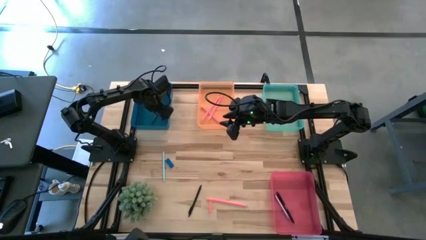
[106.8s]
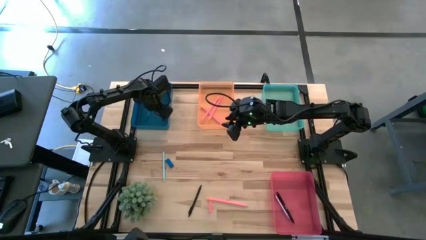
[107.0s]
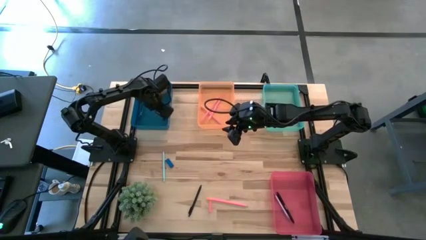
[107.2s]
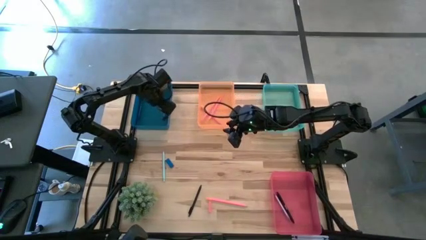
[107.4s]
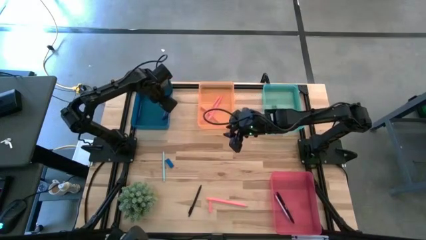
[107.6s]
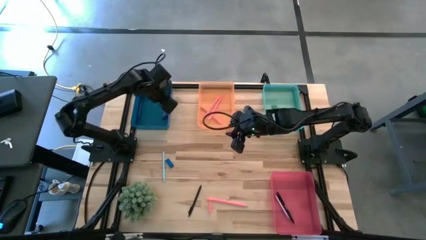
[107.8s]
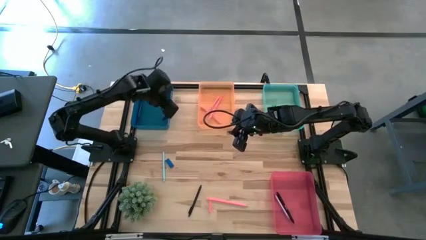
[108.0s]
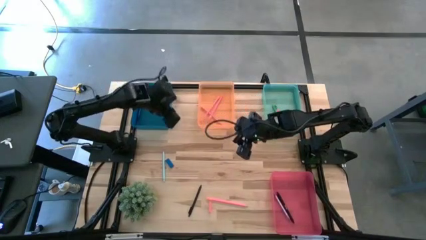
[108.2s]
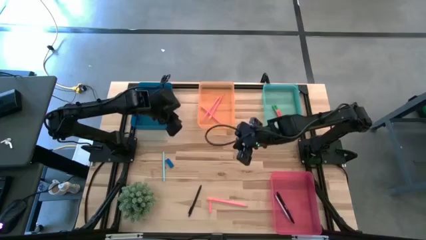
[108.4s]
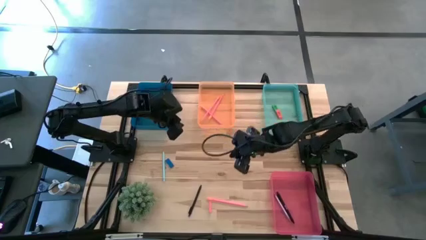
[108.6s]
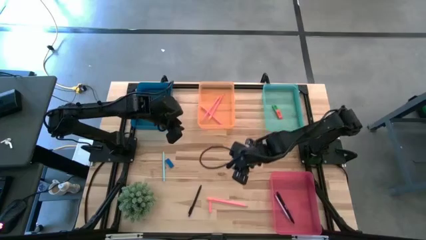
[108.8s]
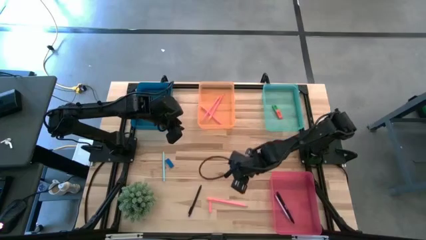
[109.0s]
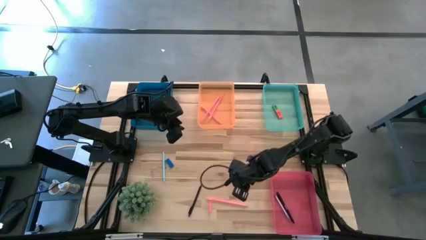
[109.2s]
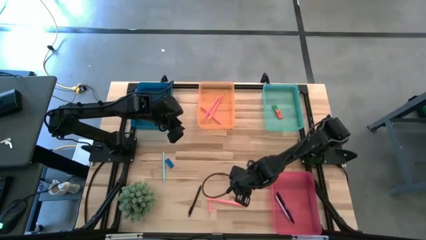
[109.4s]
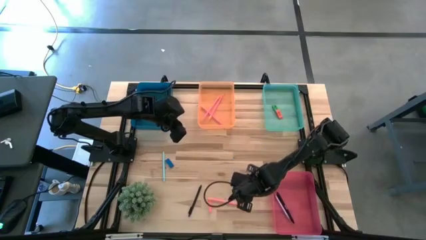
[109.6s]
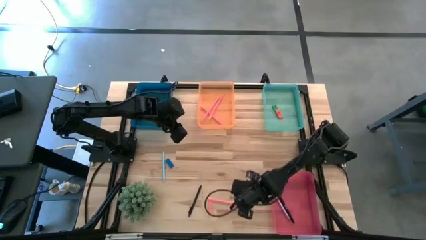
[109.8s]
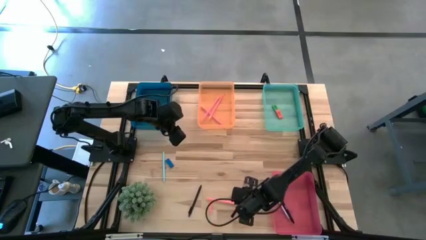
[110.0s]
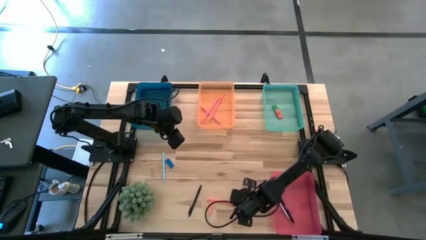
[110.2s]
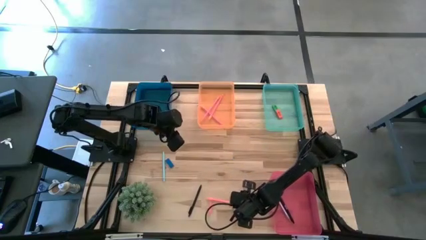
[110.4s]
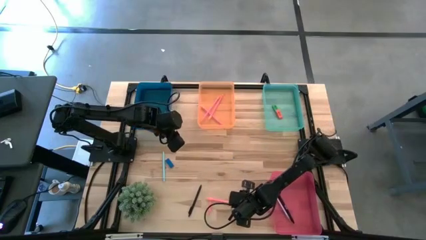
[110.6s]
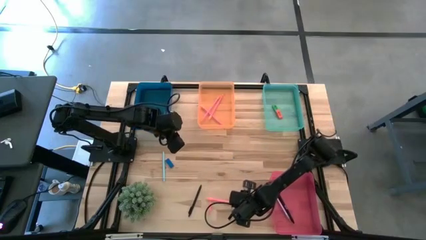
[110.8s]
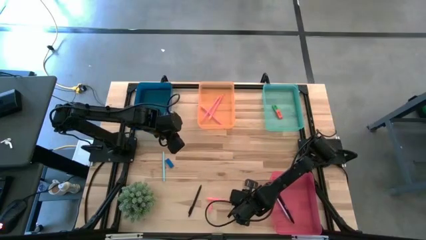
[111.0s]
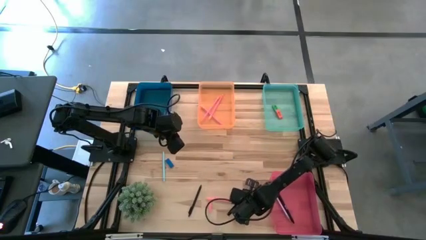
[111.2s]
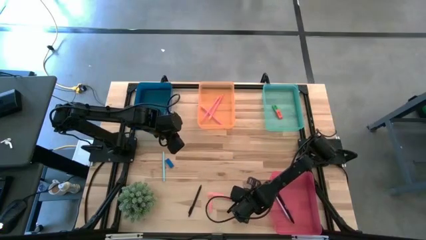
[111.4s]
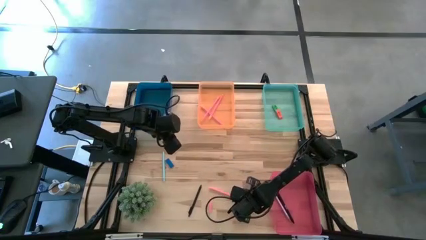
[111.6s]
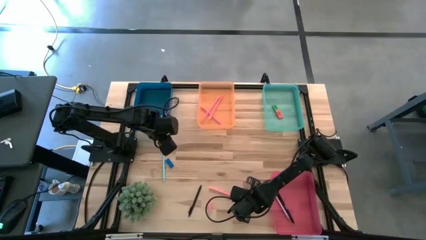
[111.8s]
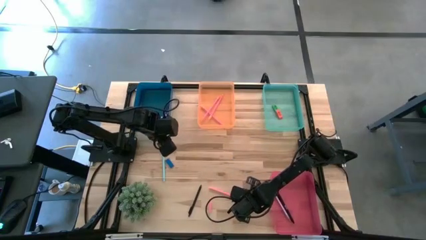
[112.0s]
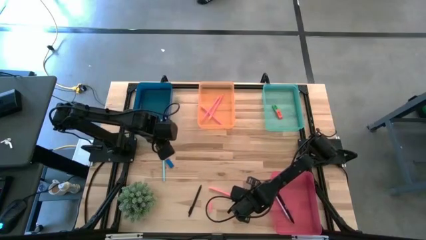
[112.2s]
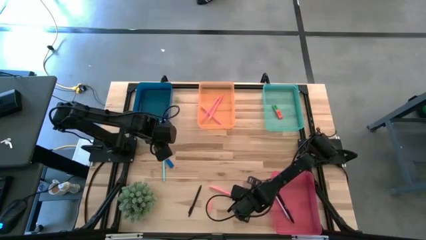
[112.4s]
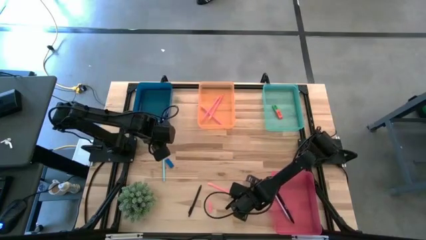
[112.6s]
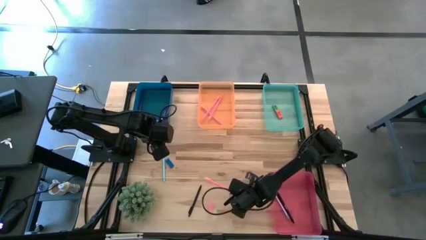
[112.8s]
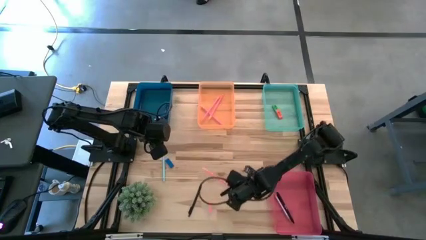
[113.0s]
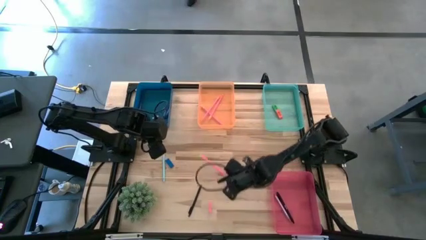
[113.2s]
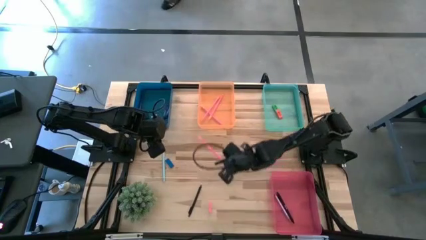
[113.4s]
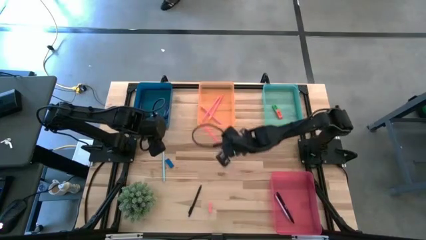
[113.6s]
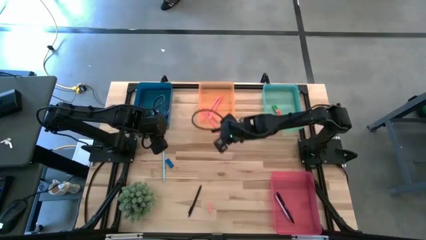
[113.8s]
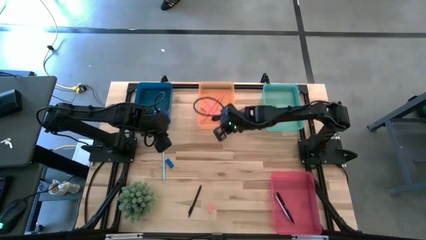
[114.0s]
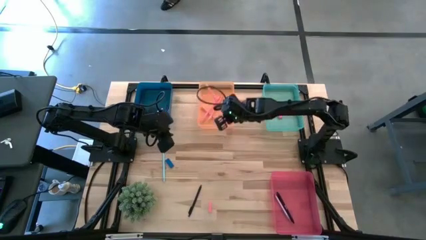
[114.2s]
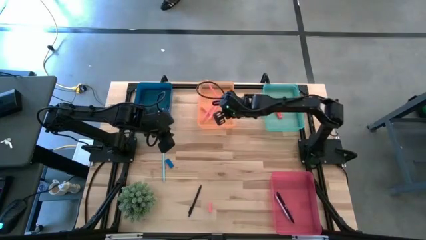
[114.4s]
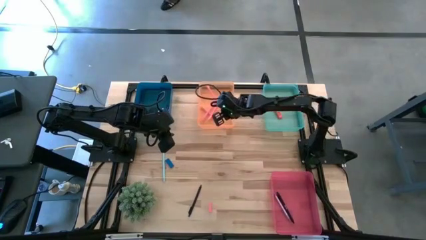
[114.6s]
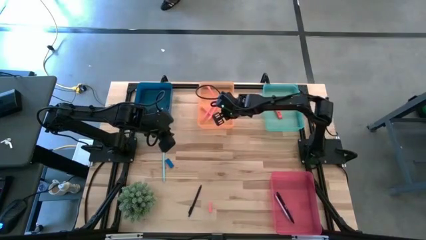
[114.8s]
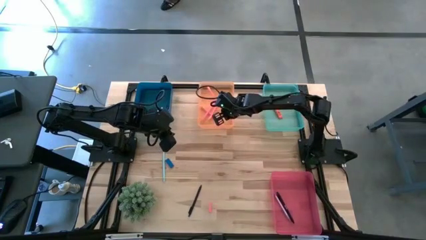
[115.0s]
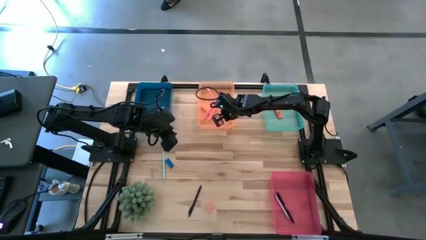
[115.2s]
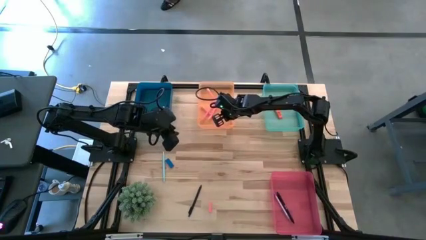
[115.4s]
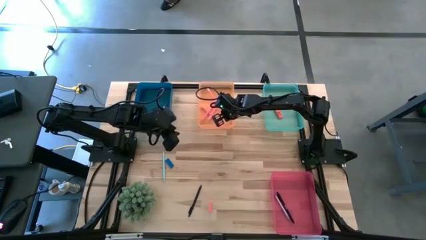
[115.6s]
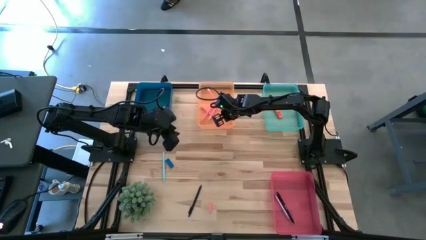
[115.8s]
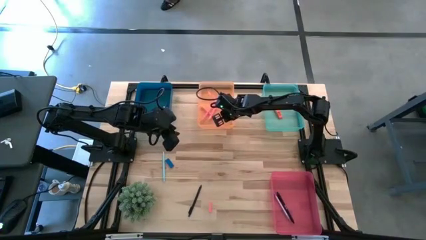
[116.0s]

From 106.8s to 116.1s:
Task: Sort crayons/erasers/pens/pencils in bins
Put the pink pencil into the orange bin

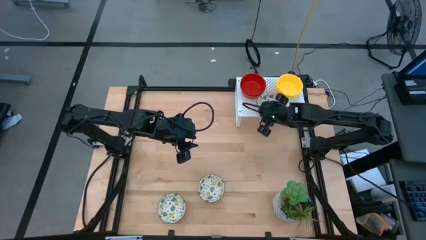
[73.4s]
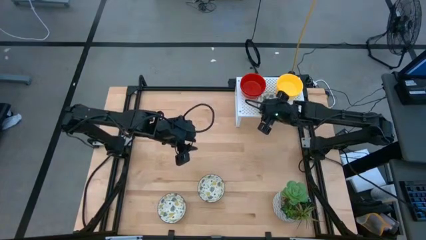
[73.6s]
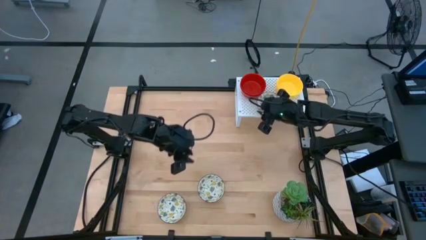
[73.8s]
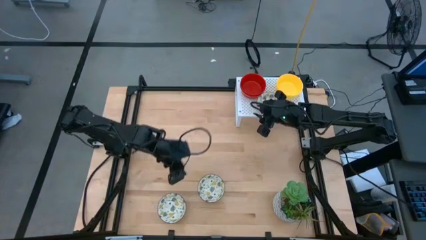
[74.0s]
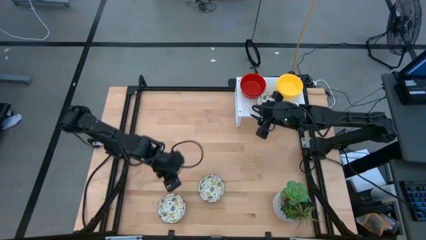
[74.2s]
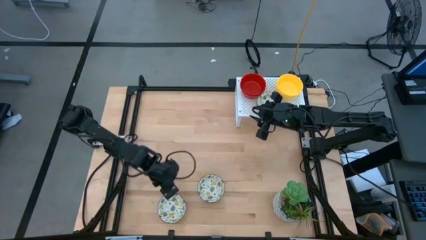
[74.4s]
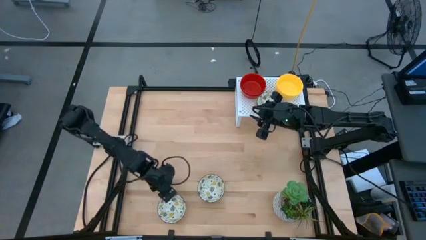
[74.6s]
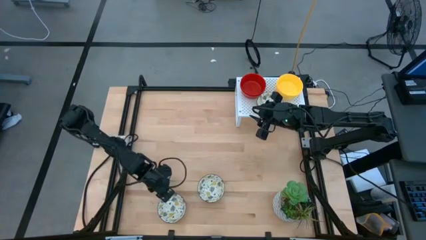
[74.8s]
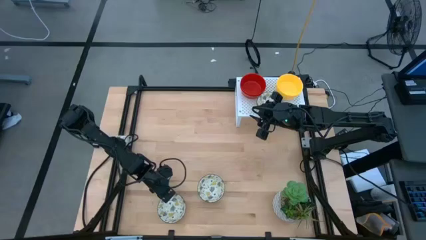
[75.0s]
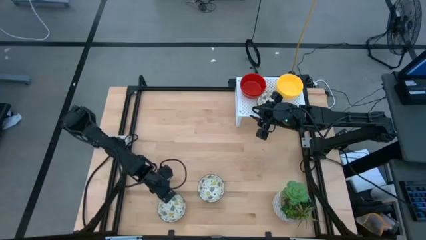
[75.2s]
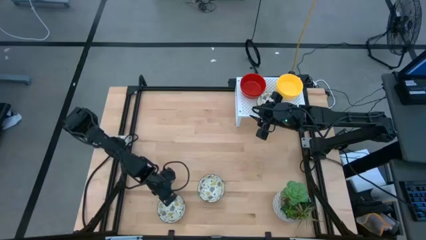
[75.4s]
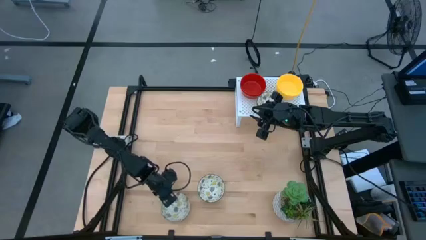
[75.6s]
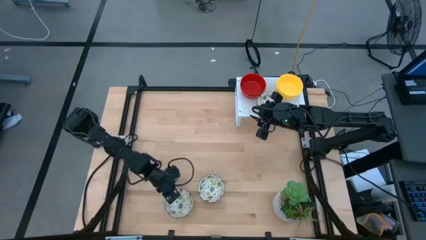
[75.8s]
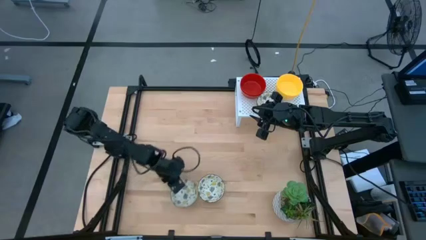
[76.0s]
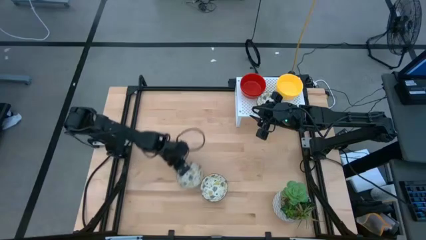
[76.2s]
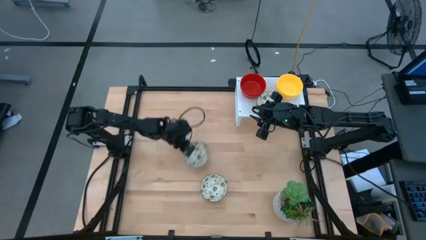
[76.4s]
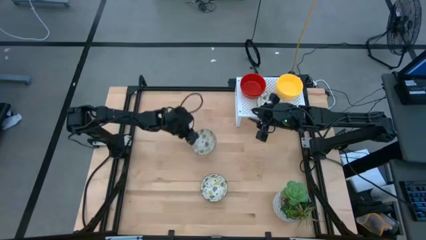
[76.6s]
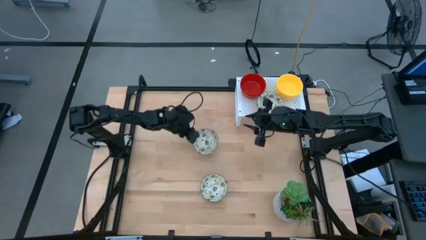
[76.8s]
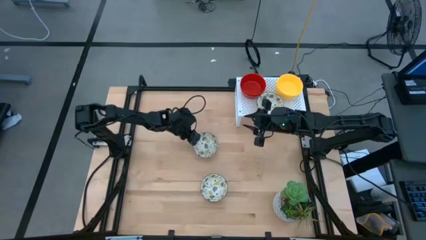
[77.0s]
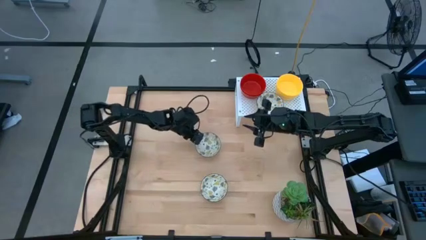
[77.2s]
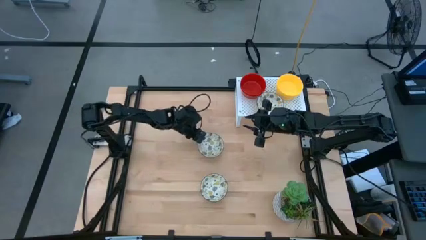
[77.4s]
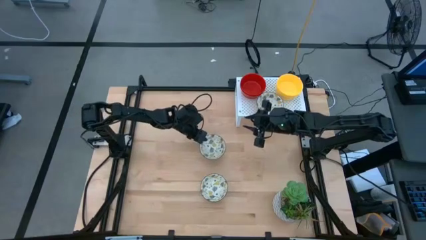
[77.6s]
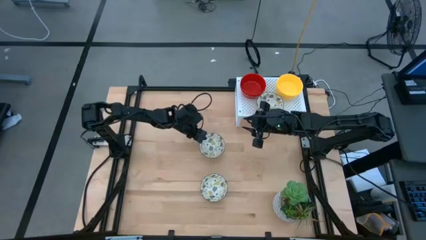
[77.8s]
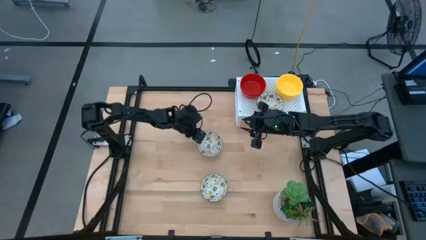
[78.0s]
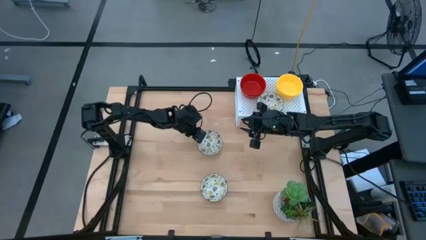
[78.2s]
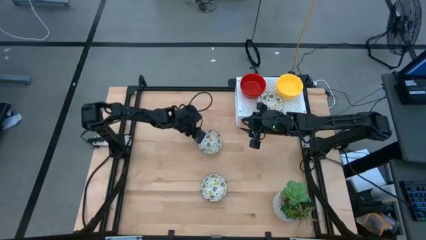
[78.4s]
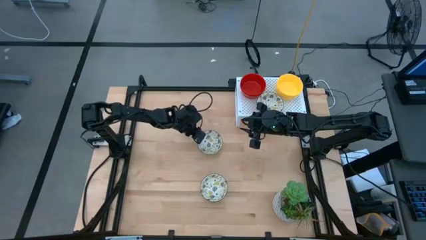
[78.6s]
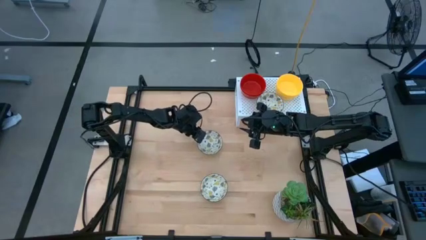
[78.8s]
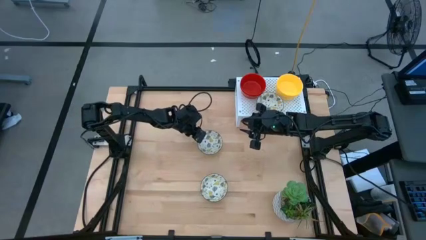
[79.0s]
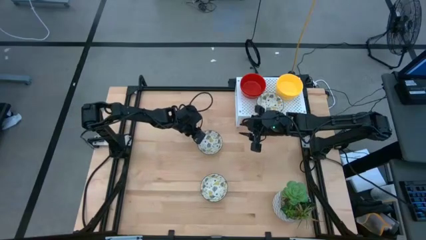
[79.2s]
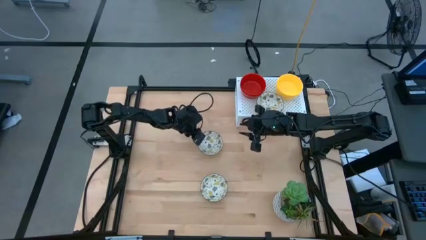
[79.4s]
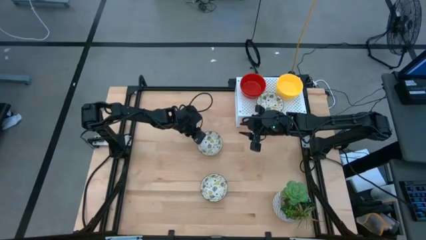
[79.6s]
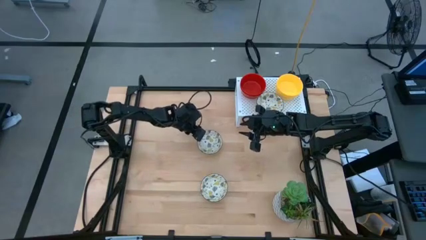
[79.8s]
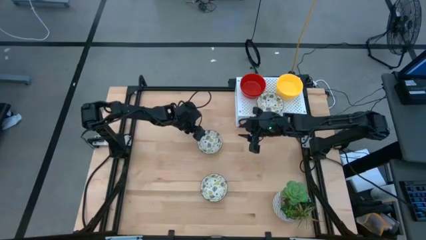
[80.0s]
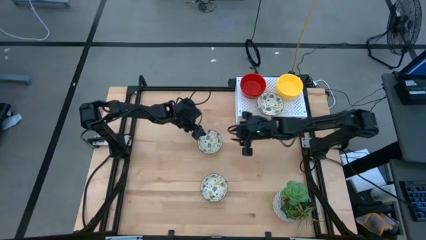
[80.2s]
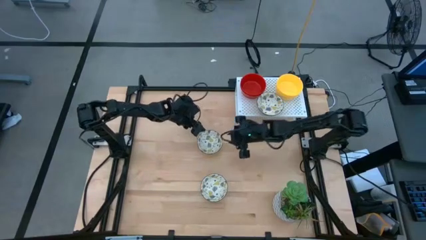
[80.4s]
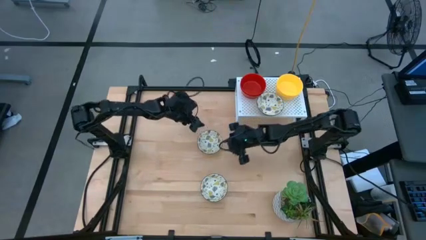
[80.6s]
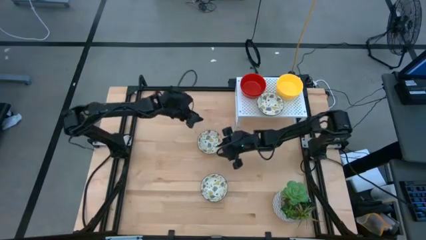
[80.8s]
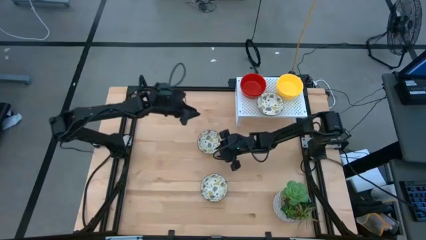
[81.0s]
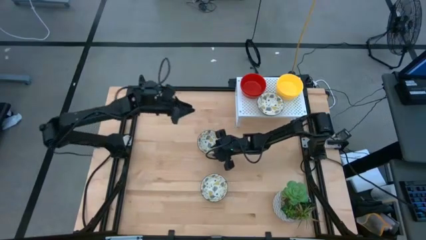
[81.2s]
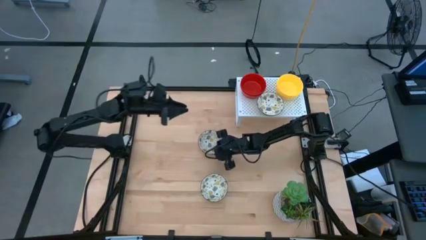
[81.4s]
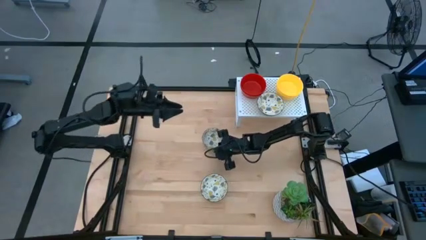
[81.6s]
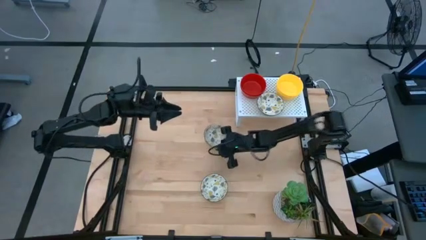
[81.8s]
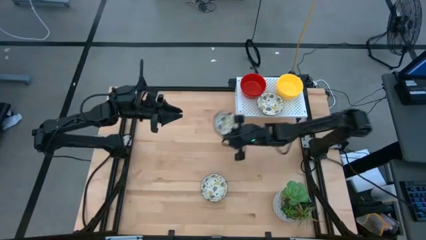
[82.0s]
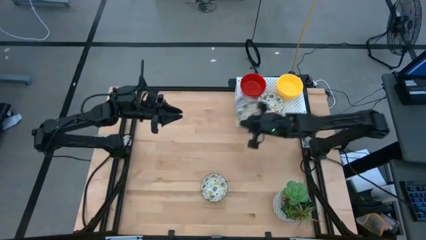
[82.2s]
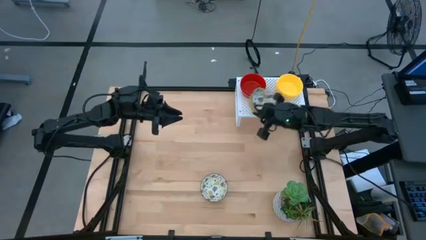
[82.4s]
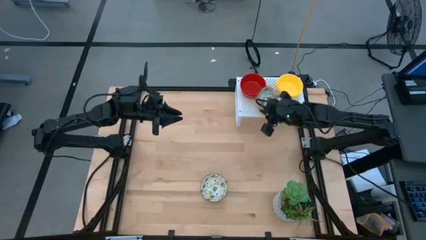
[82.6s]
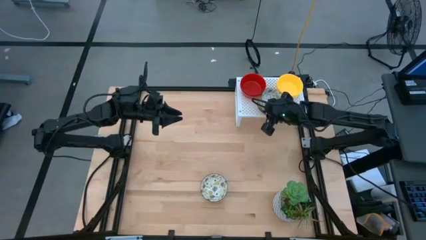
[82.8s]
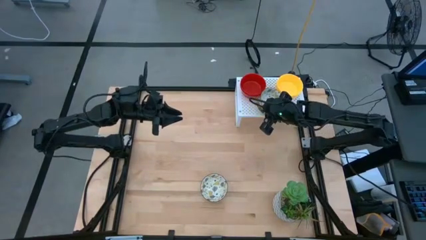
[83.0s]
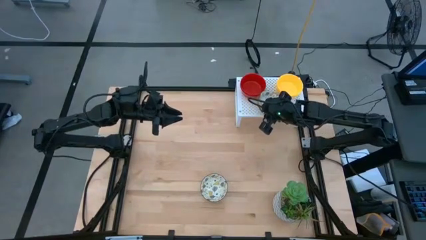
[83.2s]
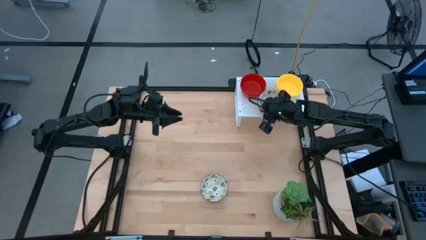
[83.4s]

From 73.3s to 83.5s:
Task: Pick & Place Mini bowls
Stack the white patterned bowl on top of the white patterned bowl on the shelf
